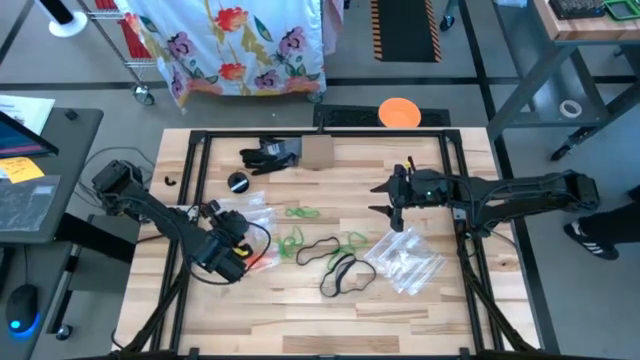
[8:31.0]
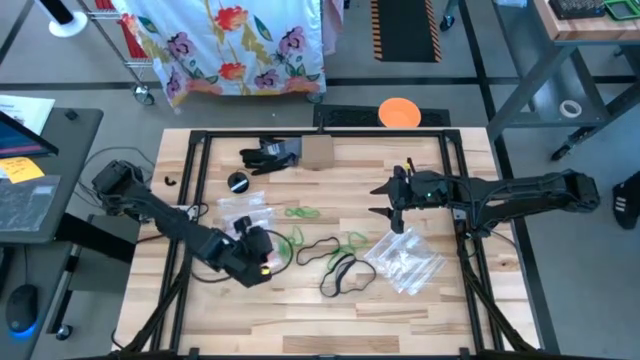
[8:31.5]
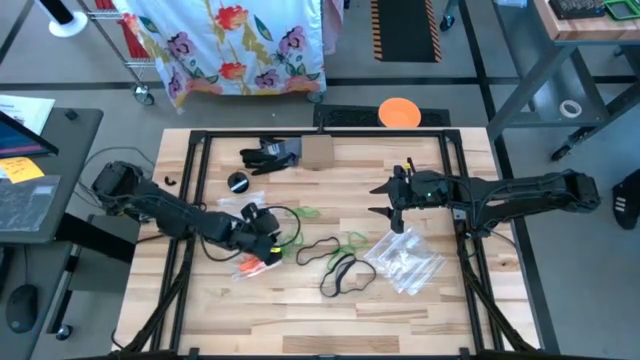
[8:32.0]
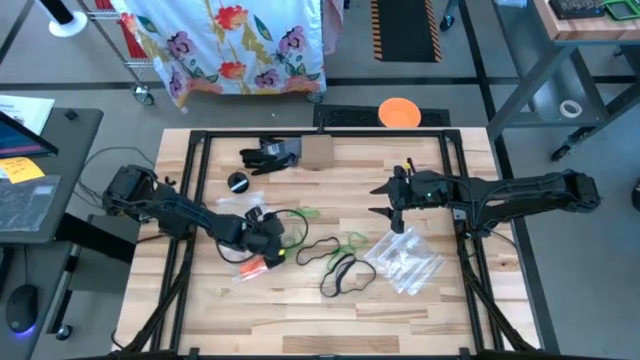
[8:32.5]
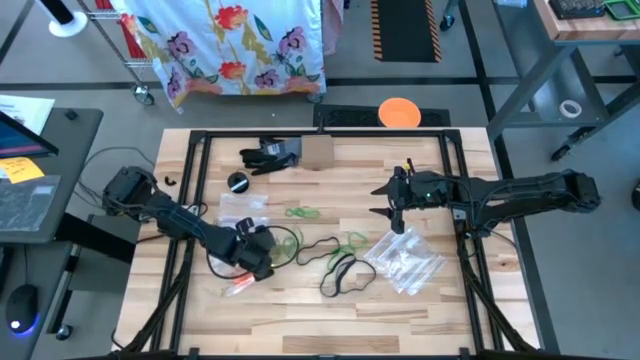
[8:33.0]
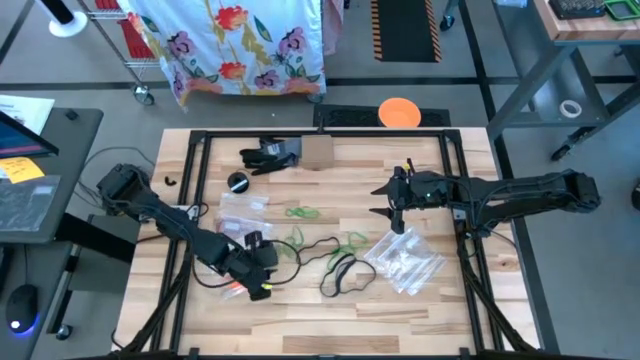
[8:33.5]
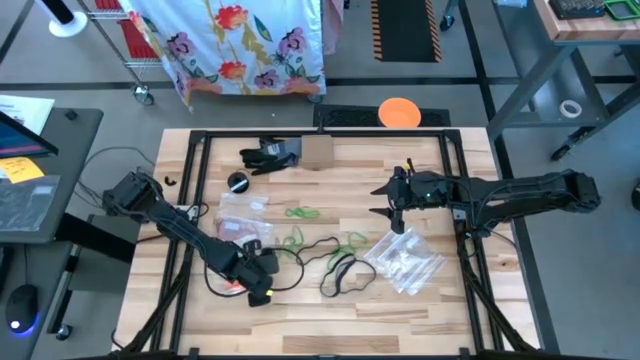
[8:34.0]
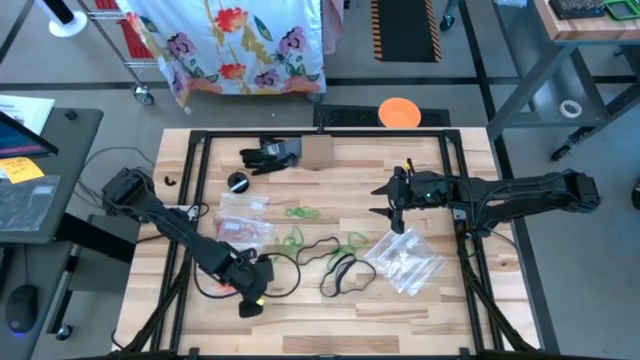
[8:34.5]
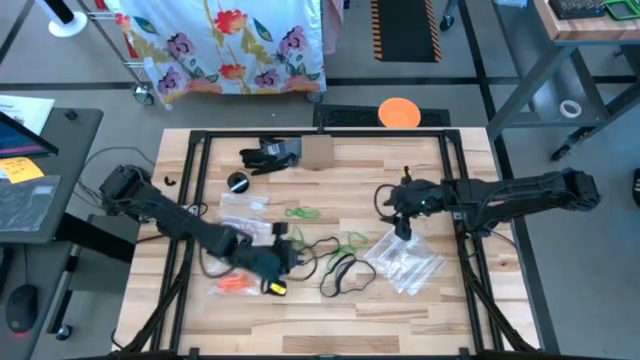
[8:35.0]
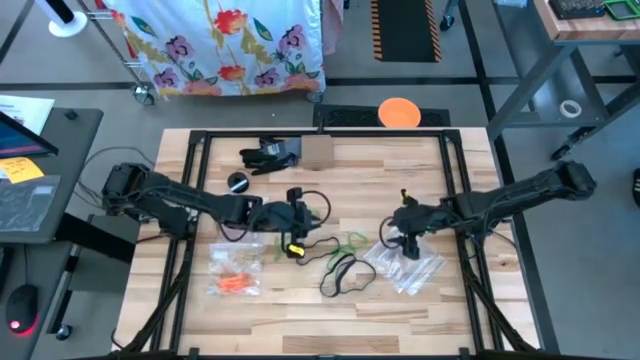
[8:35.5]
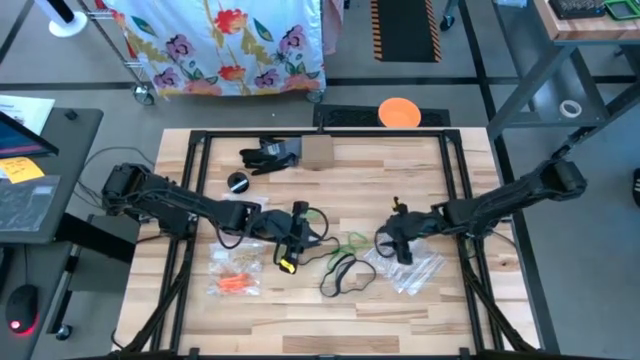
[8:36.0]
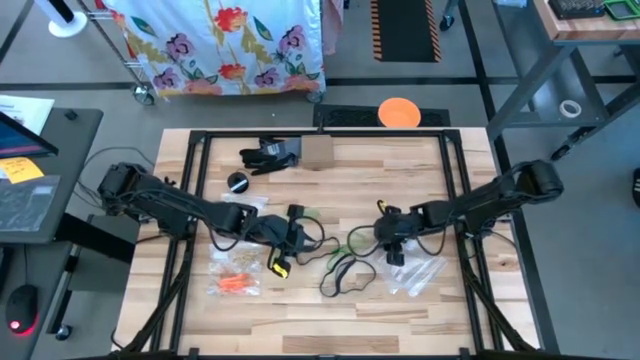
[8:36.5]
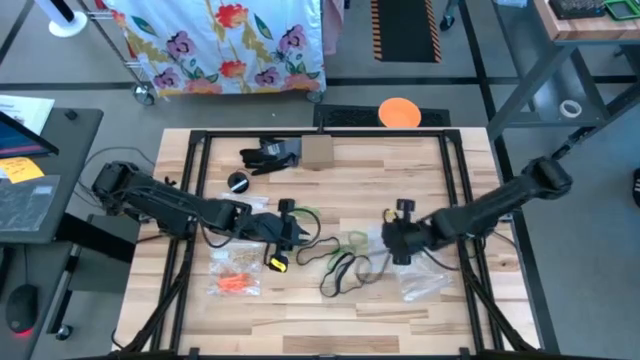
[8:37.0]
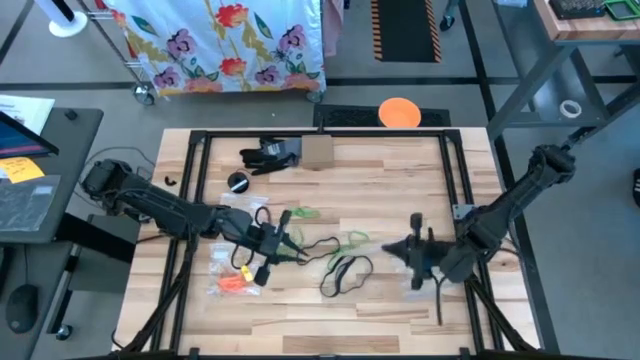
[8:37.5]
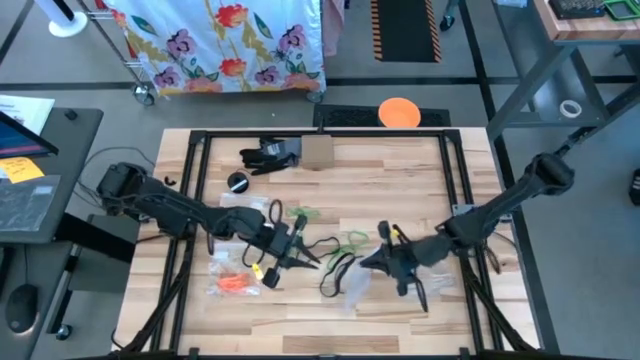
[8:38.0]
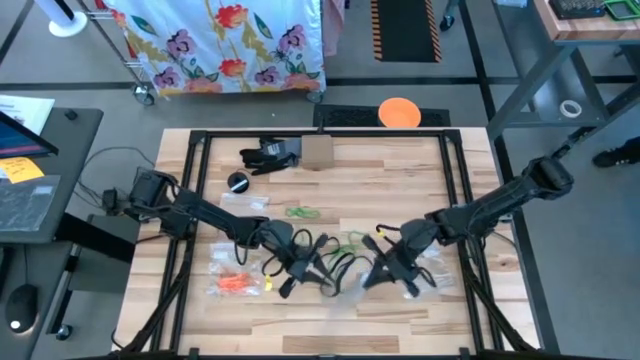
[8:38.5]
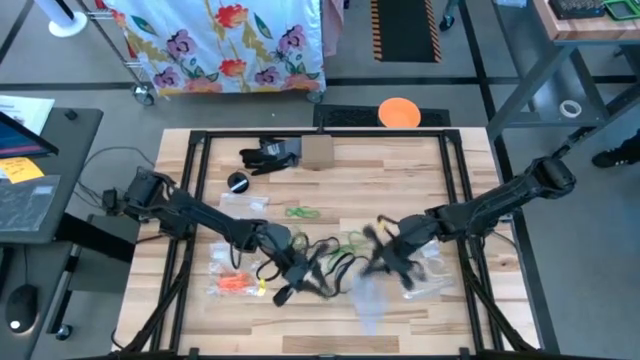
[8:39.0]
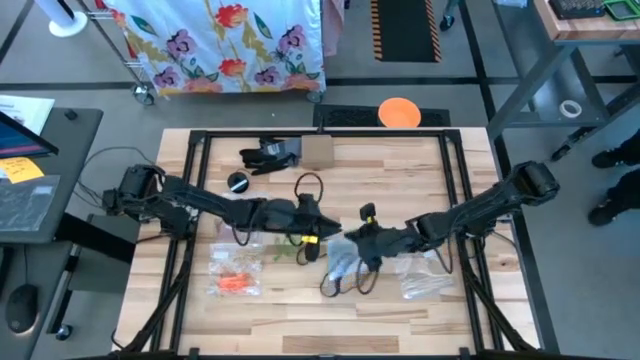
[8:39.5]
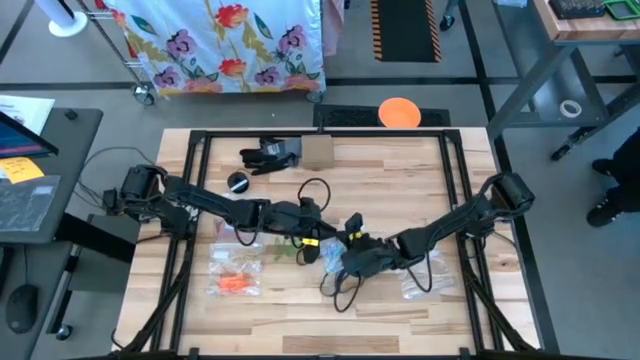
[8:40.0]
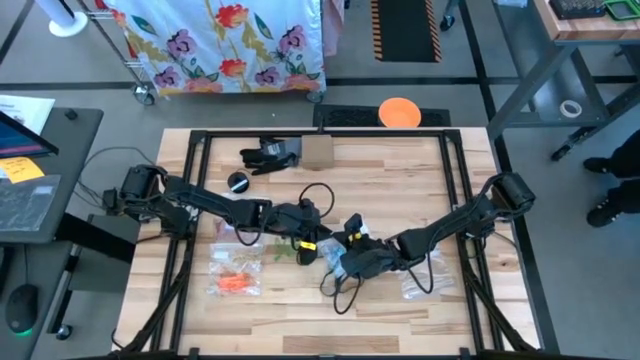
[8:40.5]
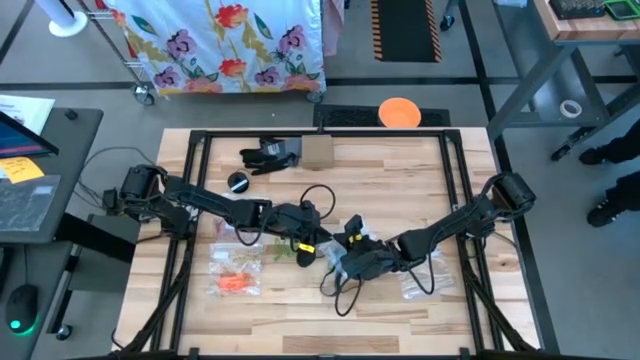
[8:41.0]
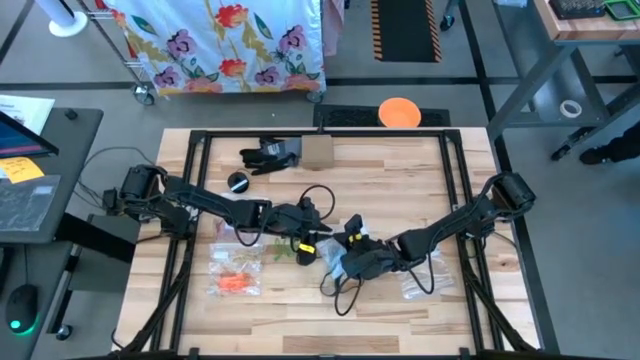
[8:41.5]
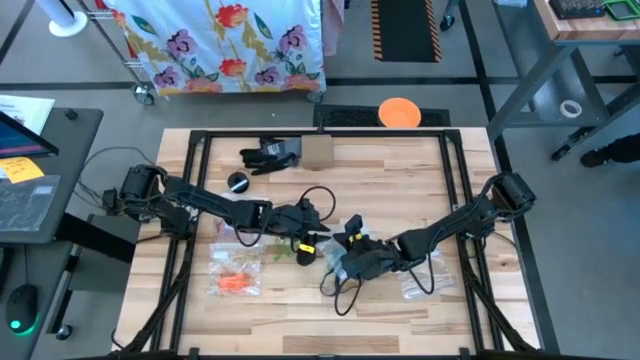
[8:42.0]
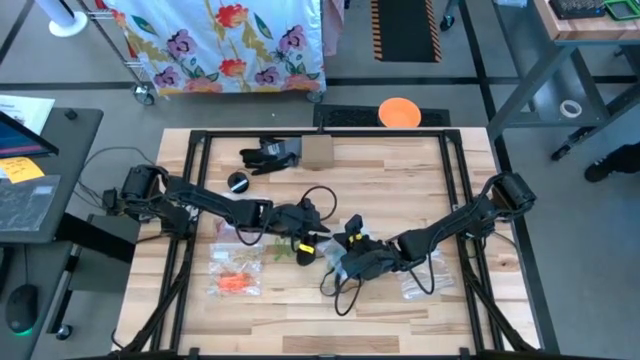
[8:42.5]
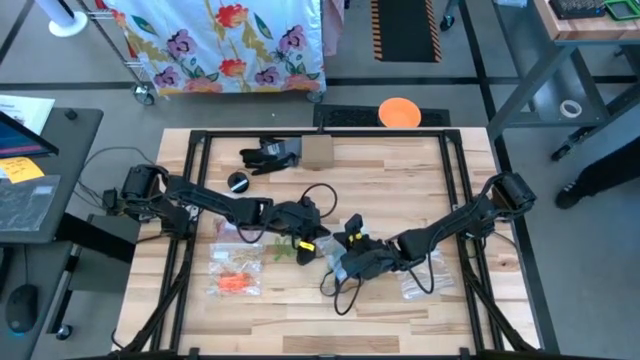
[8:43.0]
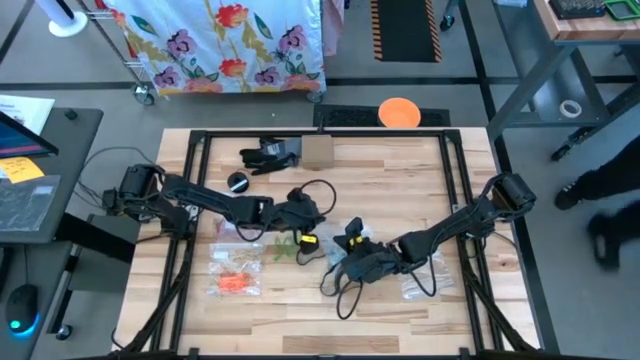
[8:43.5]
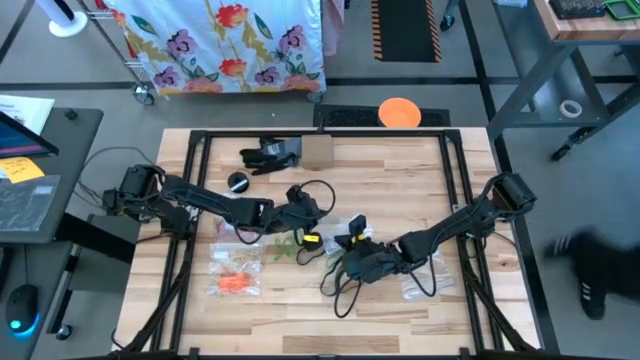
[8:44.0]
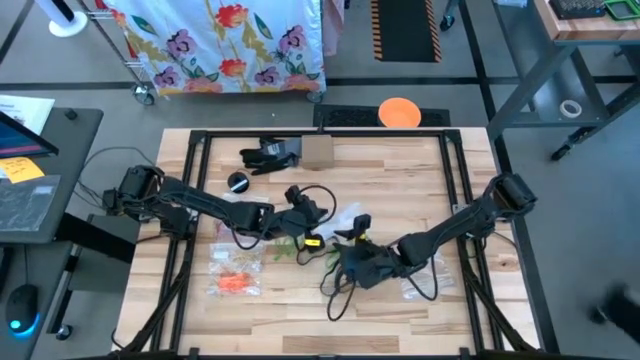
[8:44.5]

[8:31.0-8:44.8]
Task: Sort rubber bands
Open the transparent zip bag

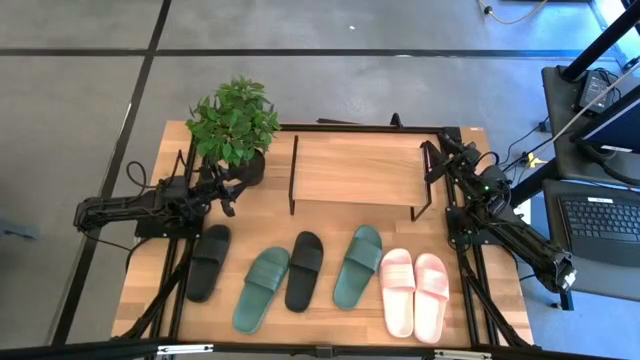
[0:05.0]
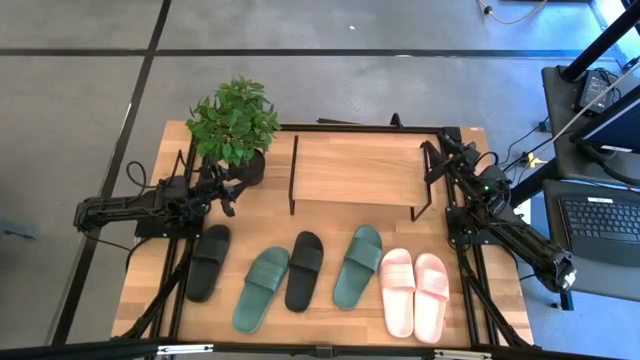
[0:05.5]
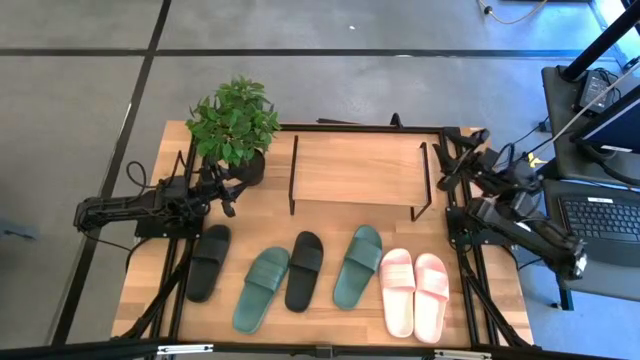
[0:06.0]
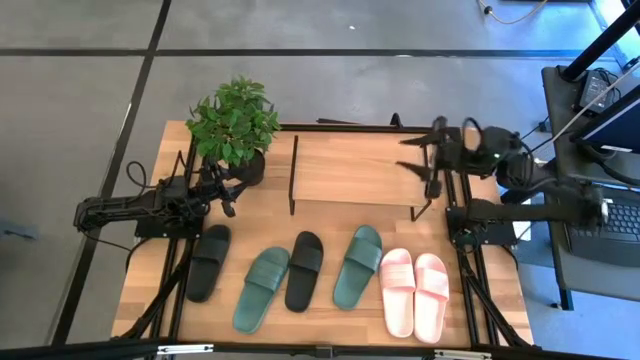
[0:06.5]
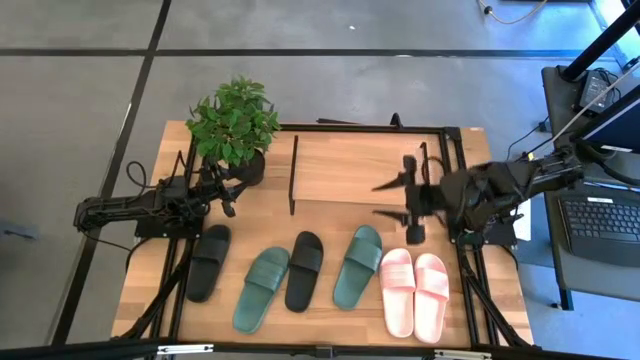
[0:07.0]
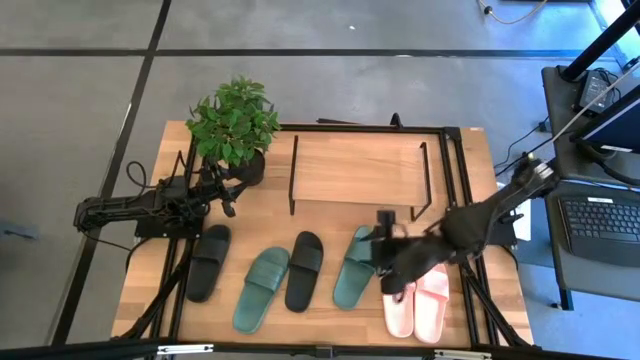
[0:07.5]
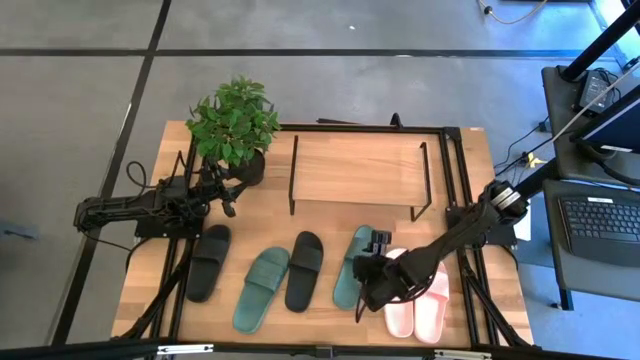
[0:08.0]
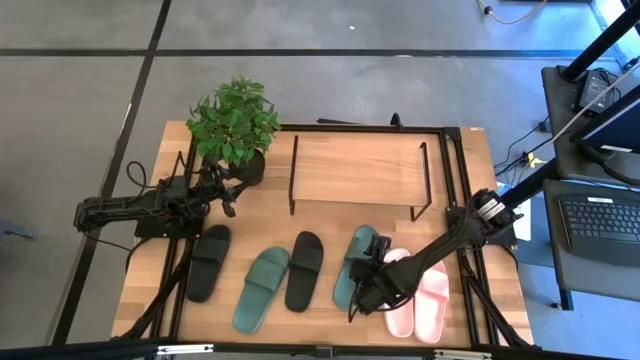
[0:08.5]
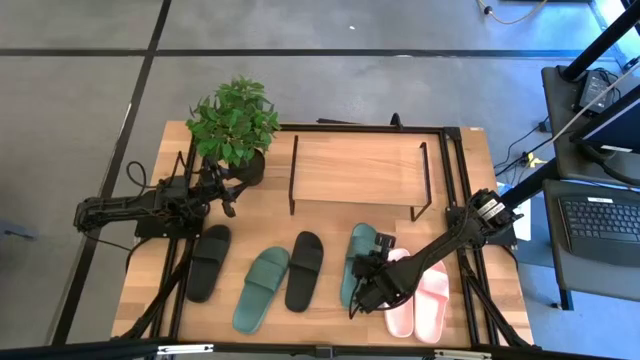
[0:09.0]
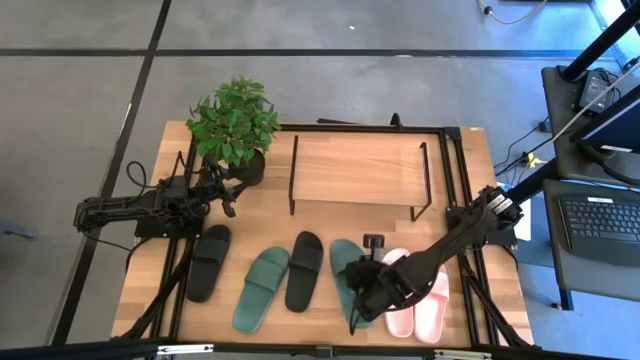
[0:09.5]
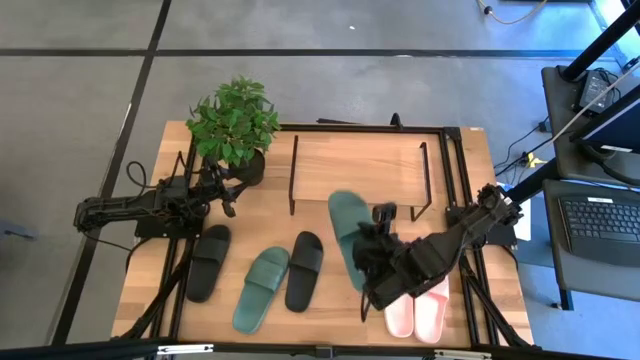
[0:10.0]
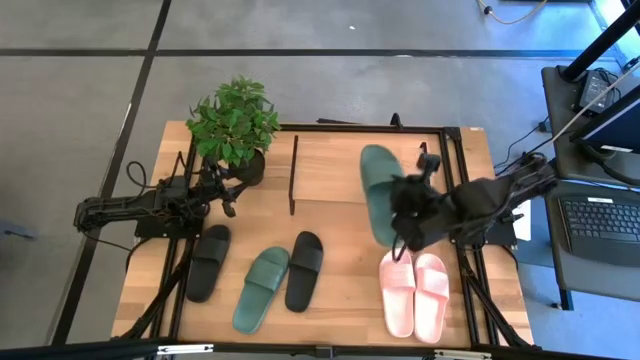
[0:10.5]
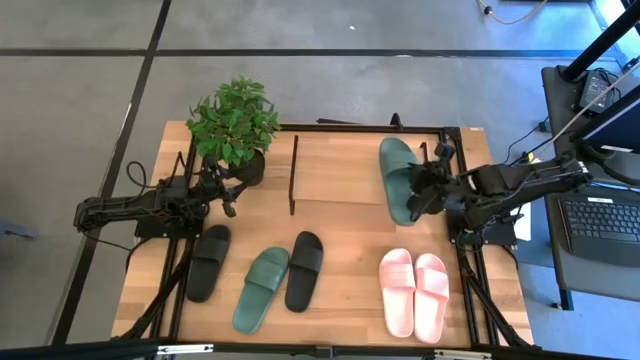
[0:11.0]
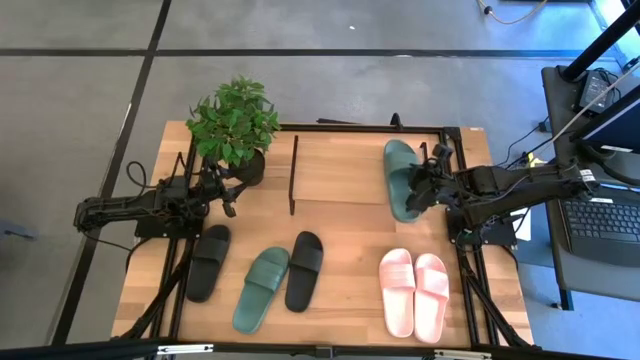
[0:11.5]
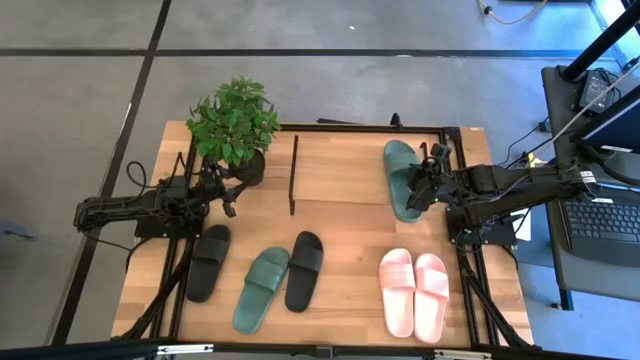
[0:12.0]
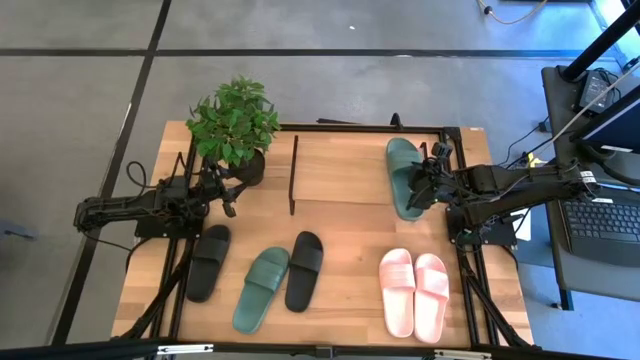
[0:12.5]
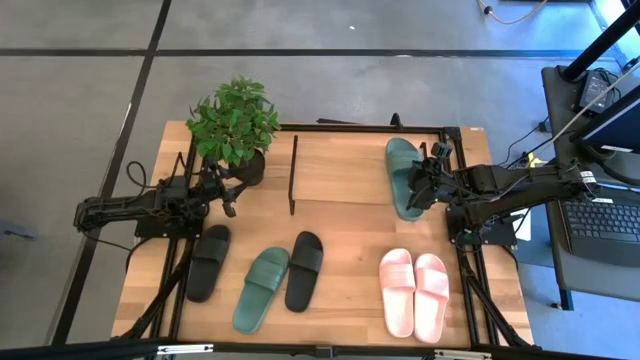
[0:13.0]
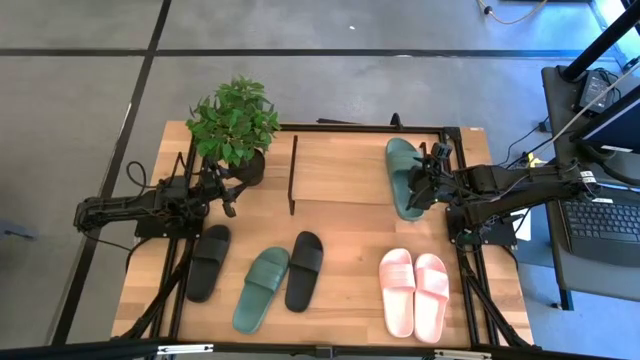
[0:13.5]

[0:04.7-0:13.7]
Task: Pick and place slides into the shelf
Put the right green slides on the shelf
